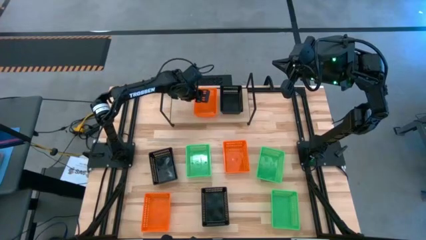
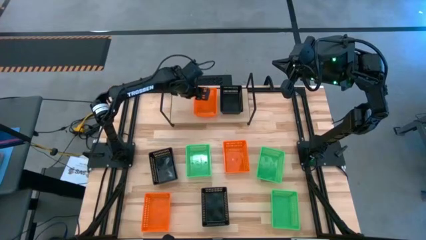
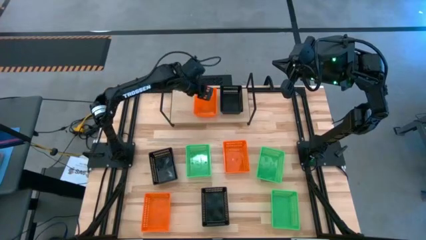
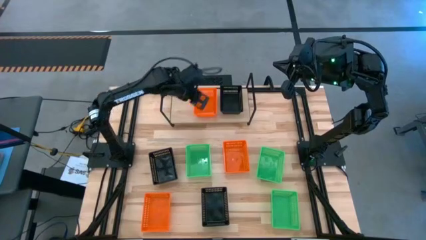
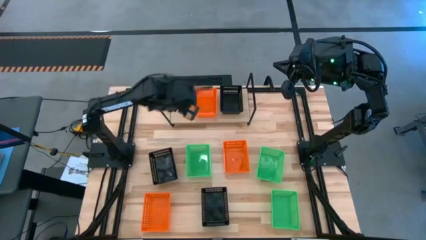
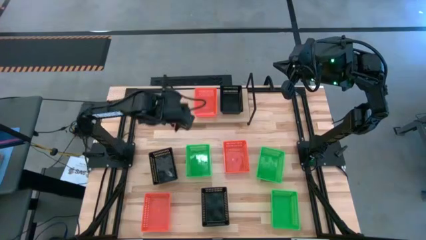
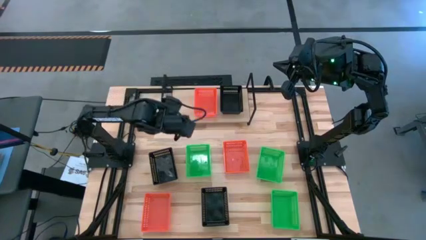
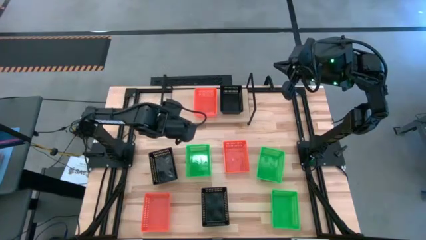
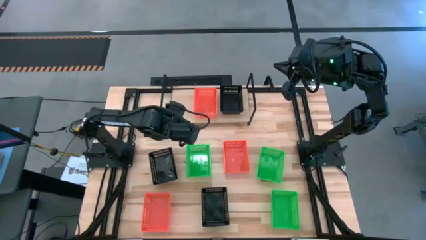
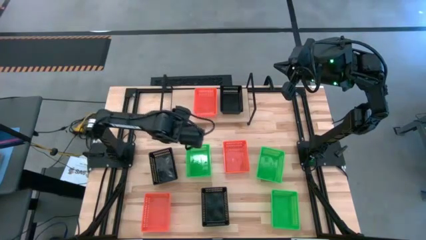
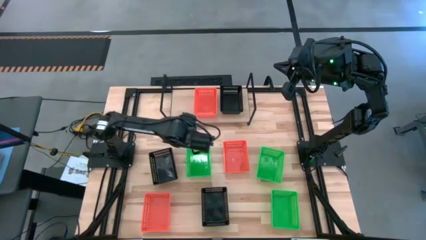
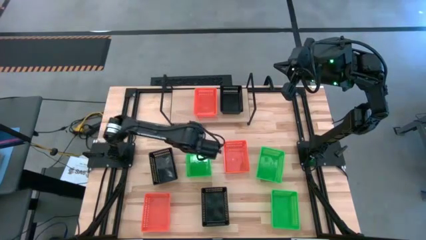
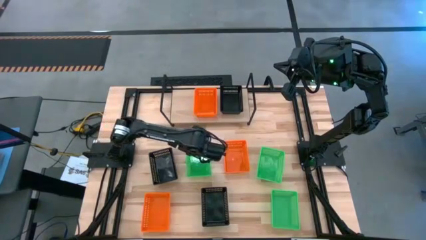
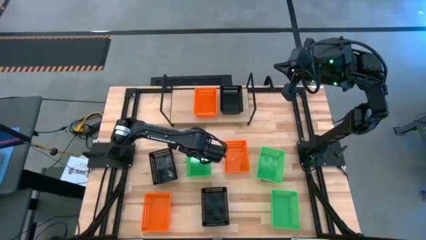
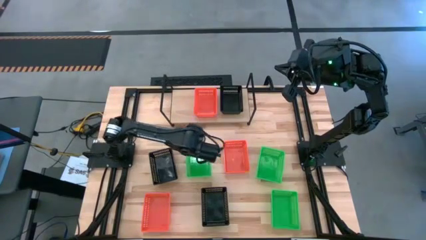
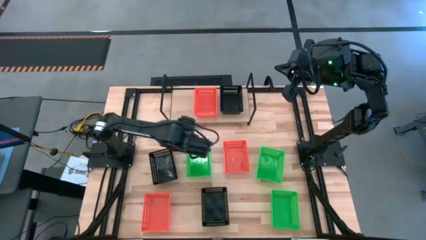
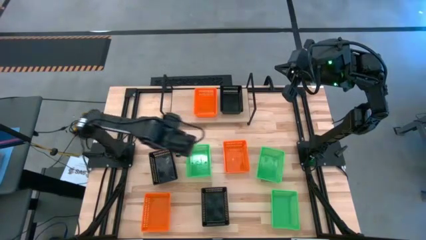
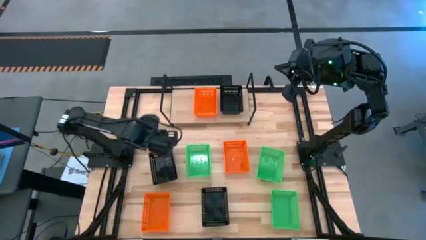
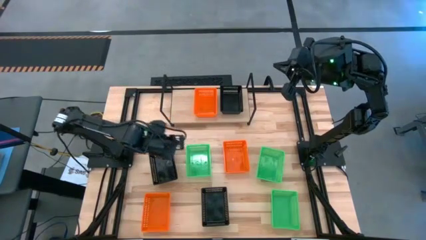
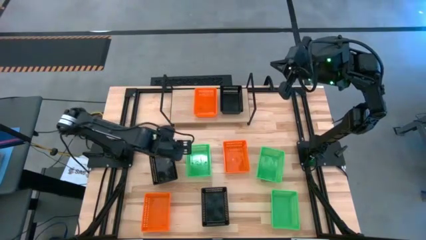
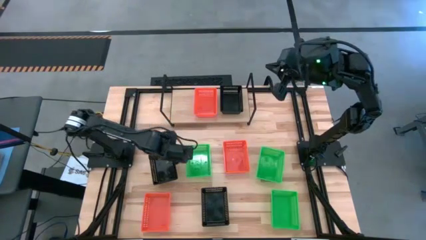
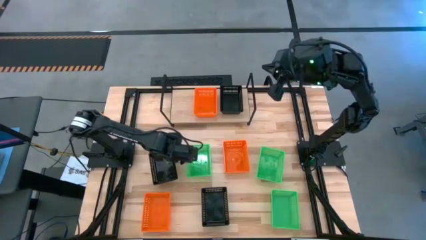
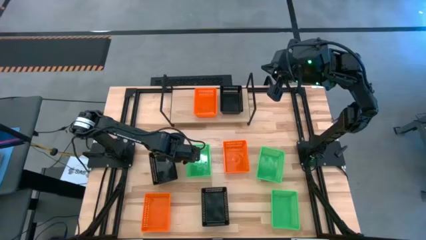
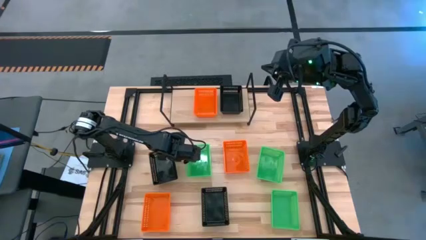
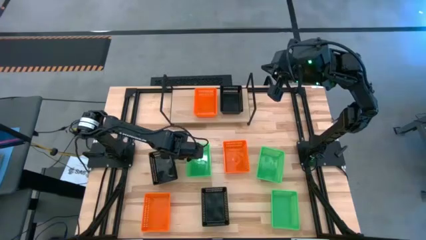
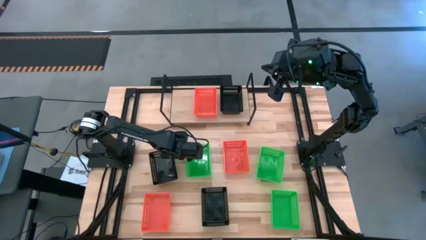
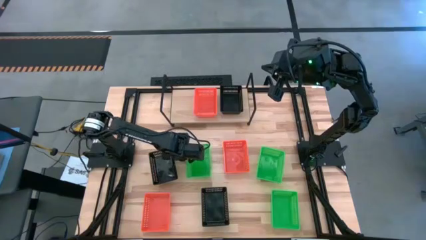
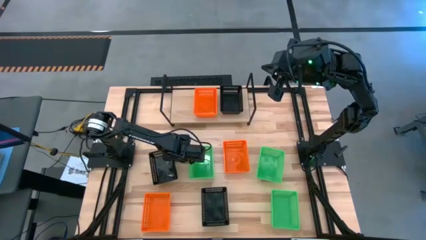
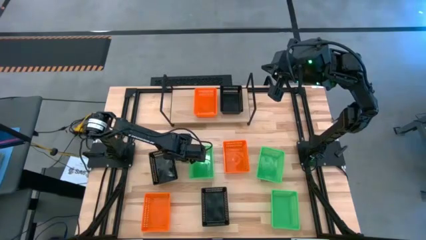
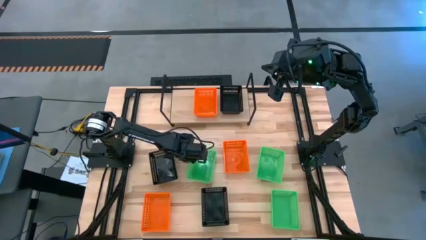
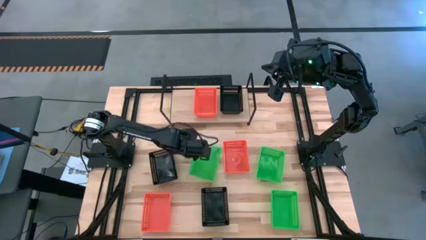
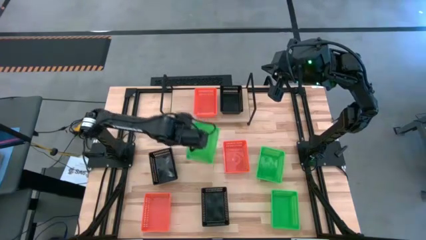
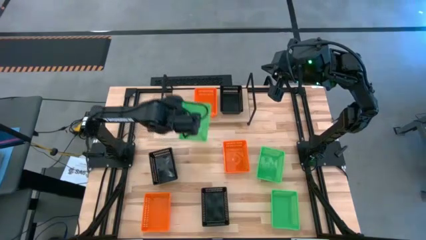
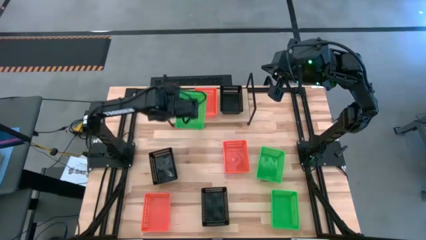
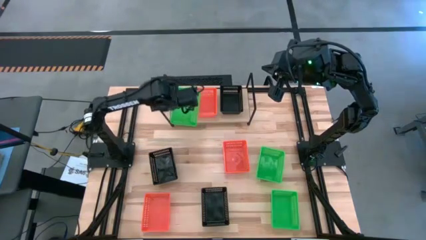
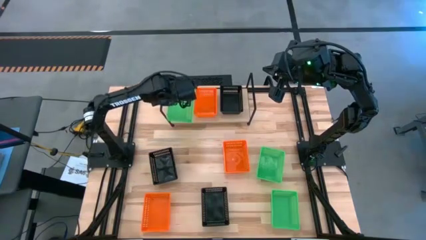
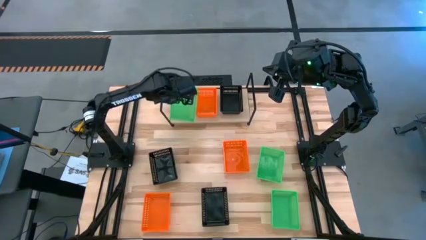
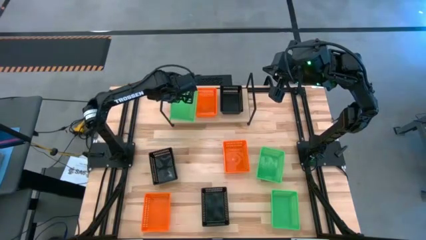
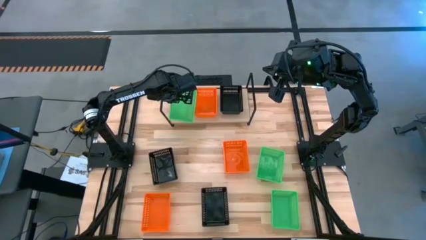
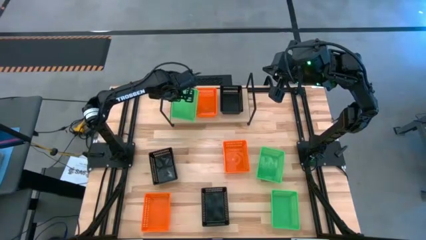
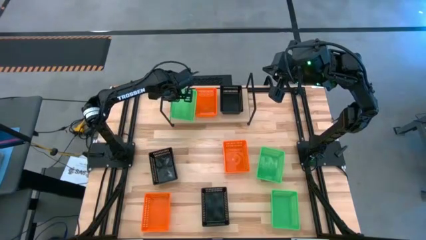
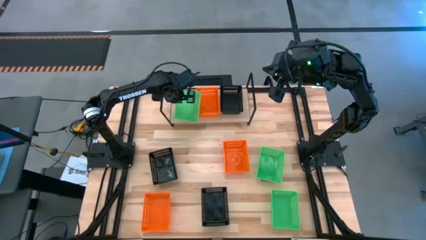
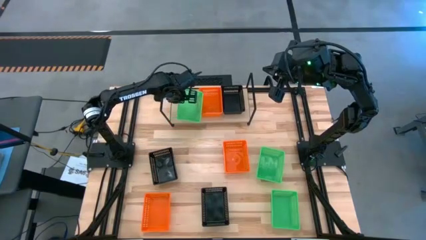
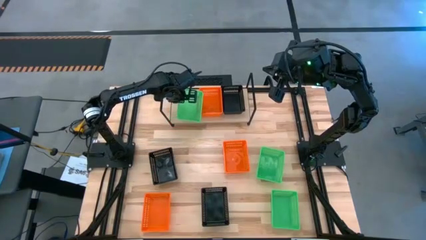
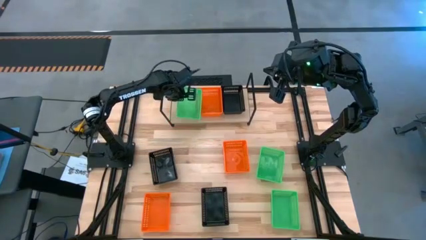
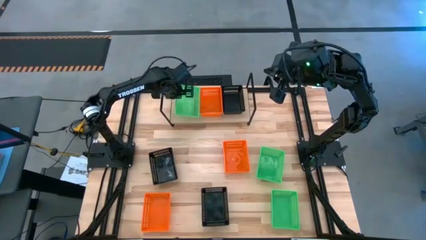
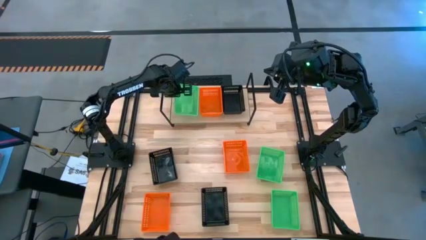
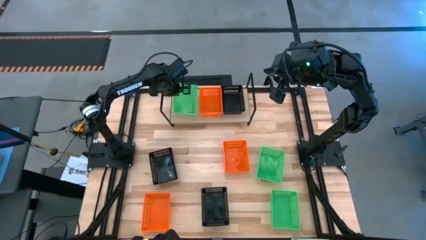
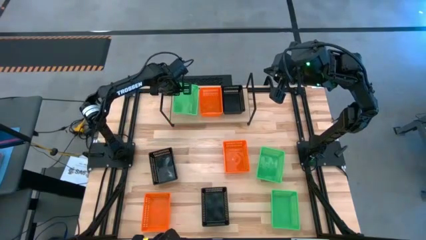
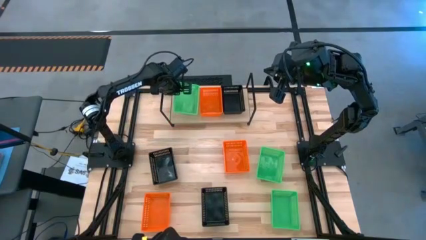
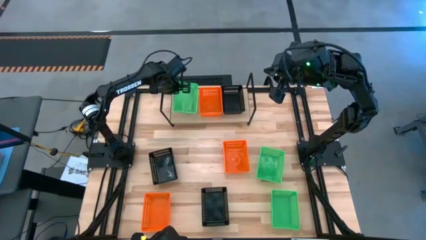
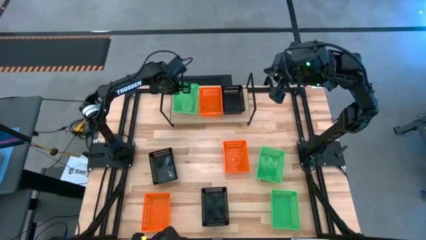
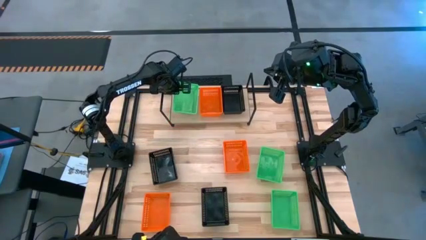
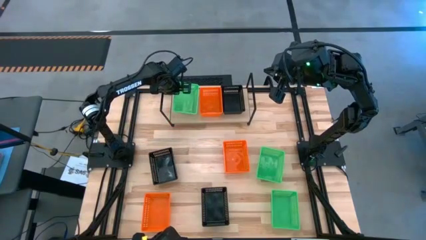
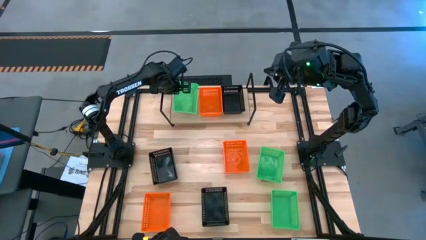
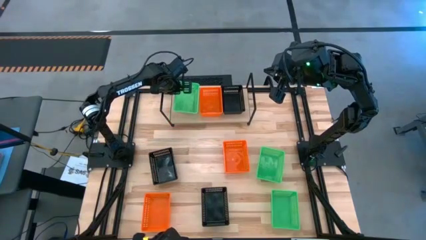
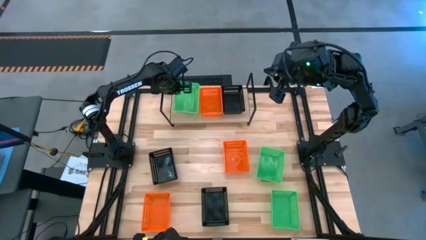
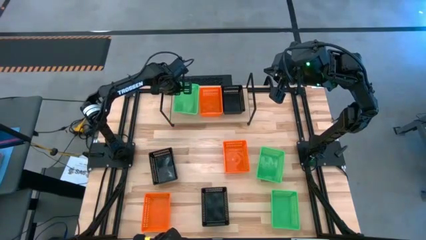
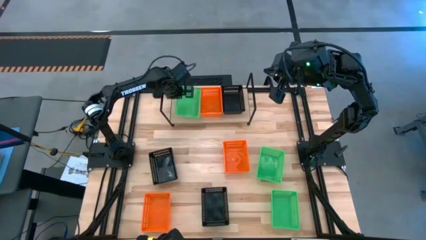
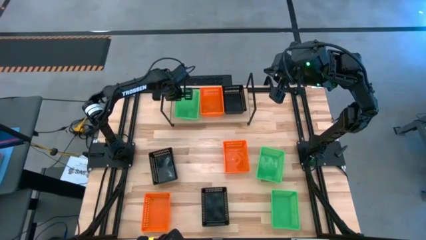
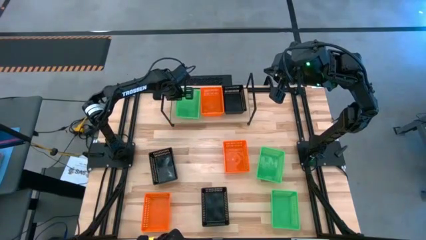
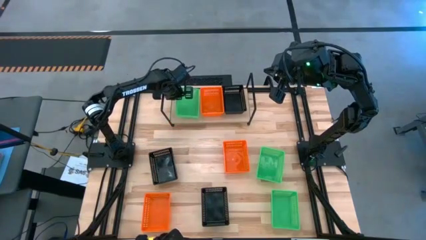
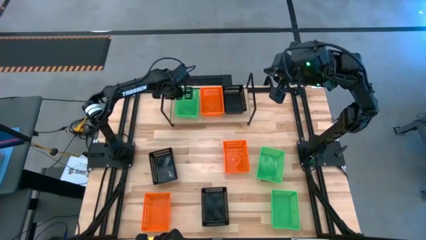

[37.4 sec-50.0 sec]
Task: Stack baskets on shelf by color
Put the top left green bin on the shelf
